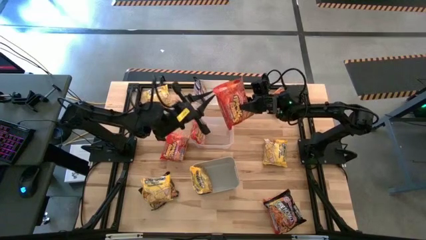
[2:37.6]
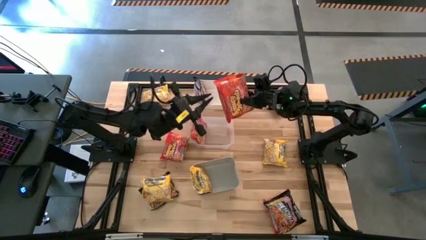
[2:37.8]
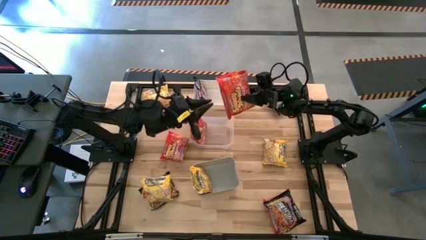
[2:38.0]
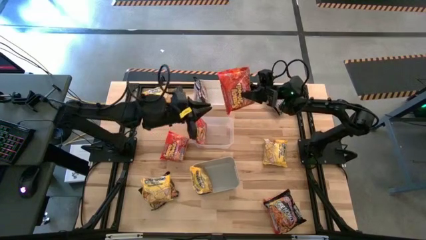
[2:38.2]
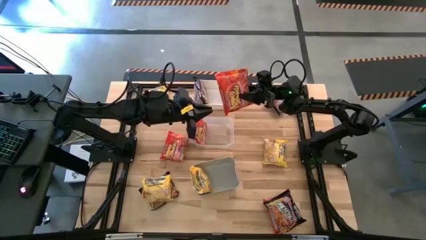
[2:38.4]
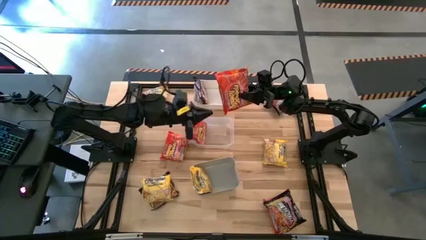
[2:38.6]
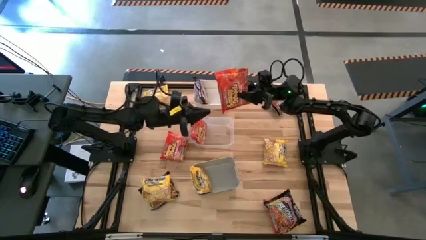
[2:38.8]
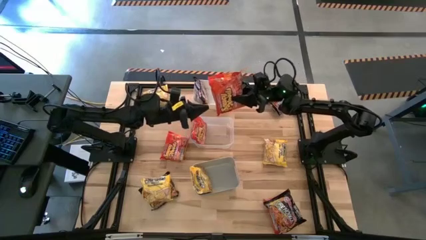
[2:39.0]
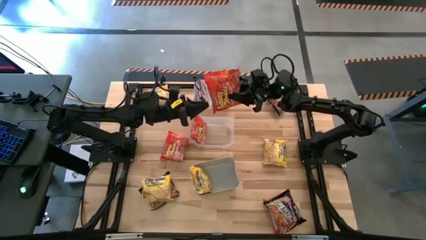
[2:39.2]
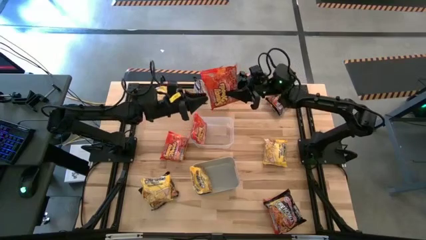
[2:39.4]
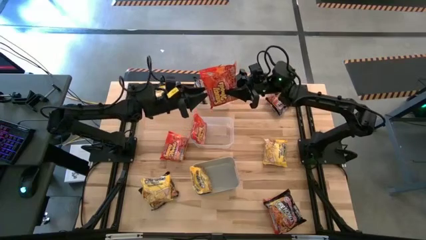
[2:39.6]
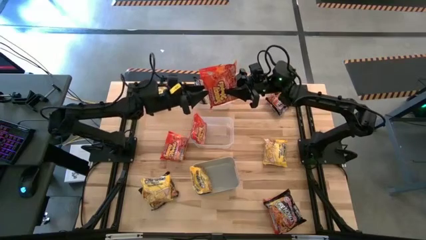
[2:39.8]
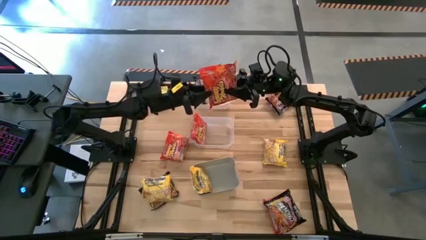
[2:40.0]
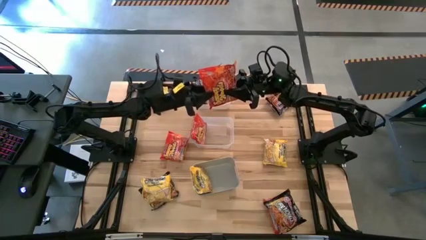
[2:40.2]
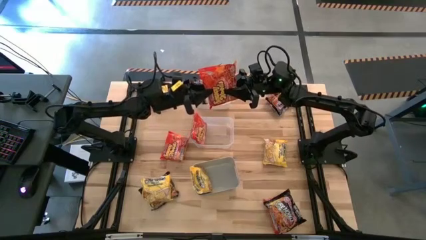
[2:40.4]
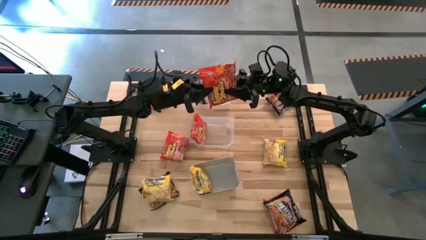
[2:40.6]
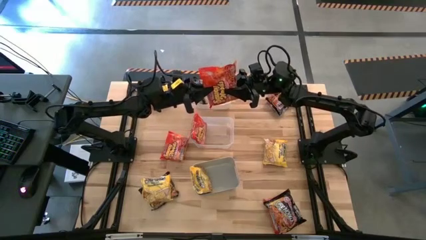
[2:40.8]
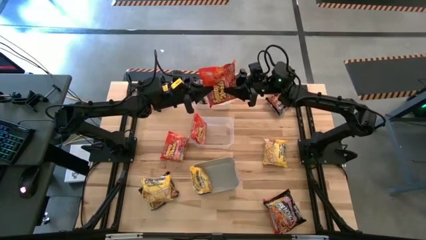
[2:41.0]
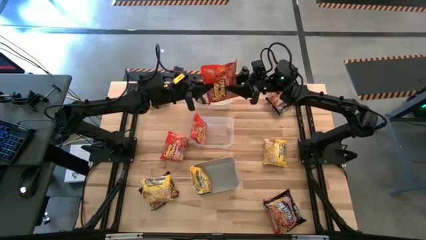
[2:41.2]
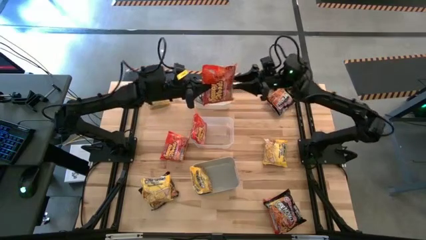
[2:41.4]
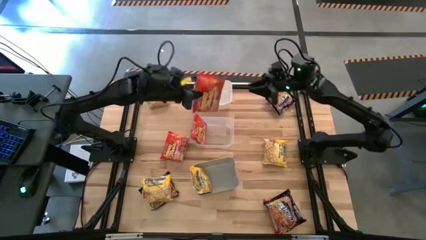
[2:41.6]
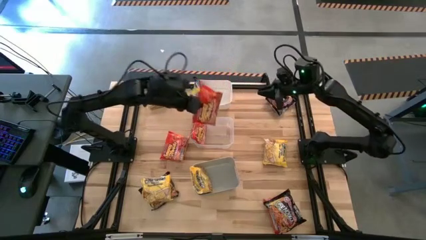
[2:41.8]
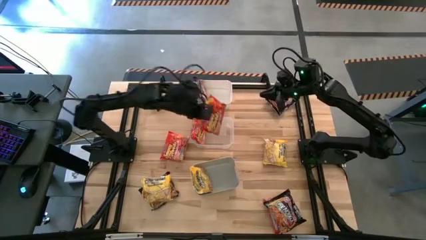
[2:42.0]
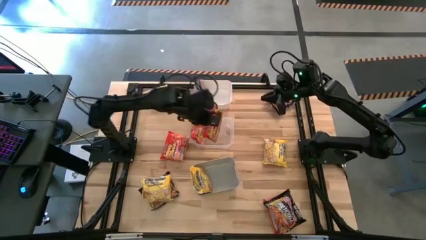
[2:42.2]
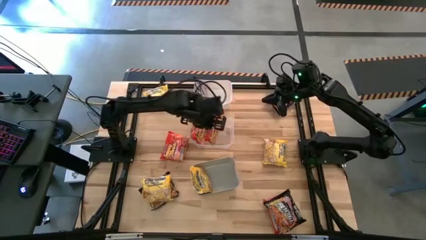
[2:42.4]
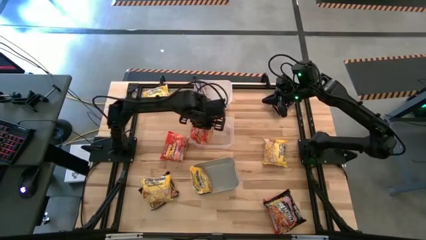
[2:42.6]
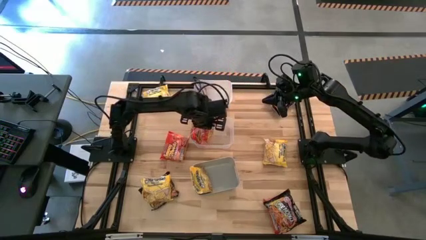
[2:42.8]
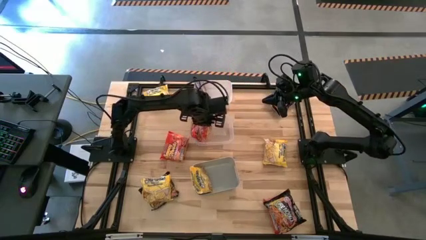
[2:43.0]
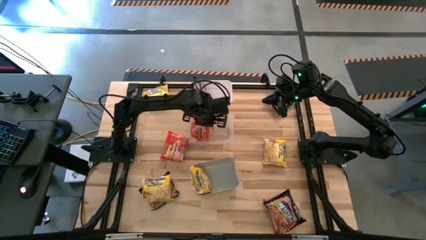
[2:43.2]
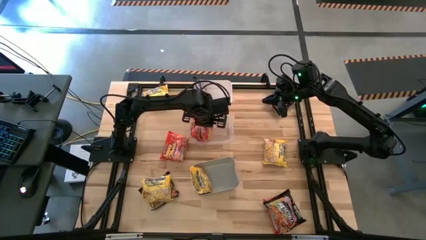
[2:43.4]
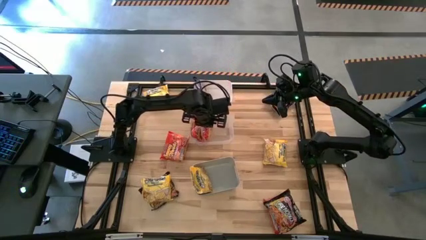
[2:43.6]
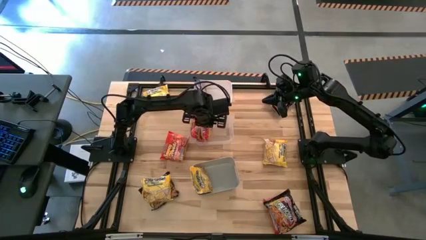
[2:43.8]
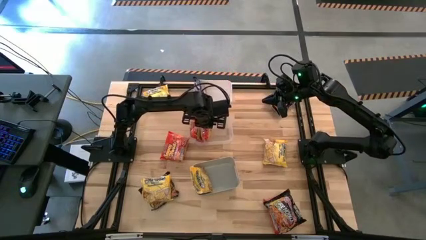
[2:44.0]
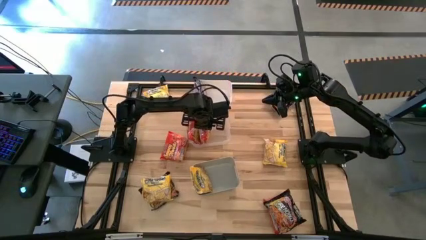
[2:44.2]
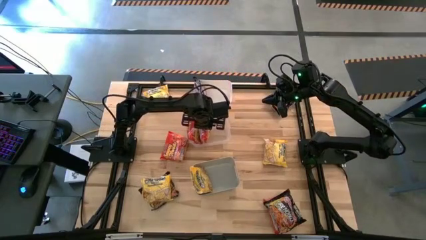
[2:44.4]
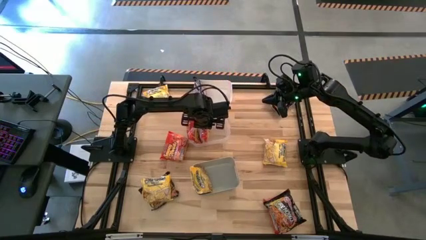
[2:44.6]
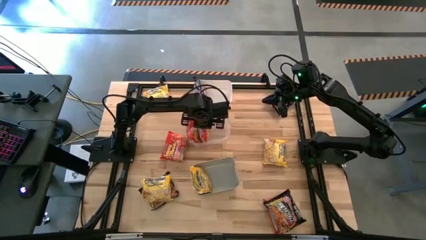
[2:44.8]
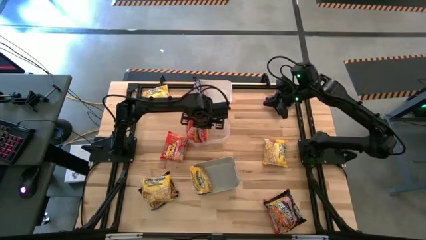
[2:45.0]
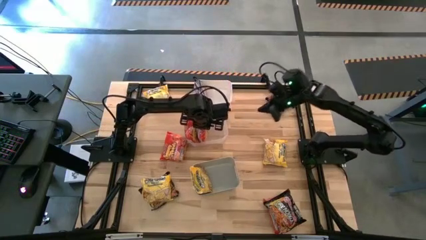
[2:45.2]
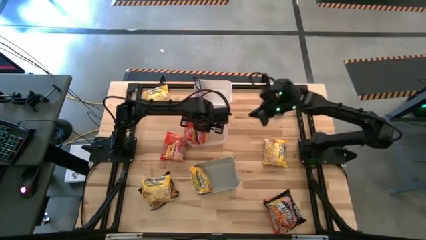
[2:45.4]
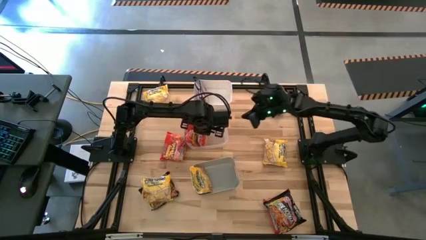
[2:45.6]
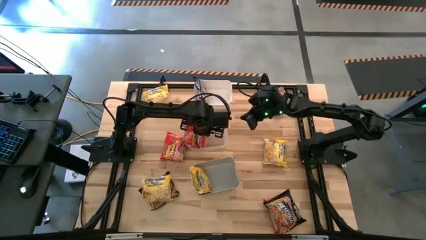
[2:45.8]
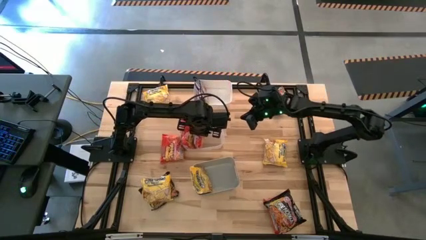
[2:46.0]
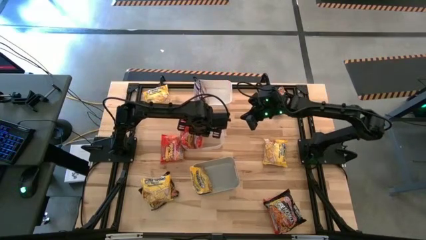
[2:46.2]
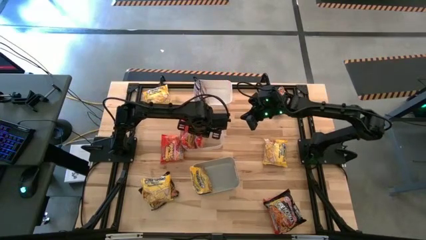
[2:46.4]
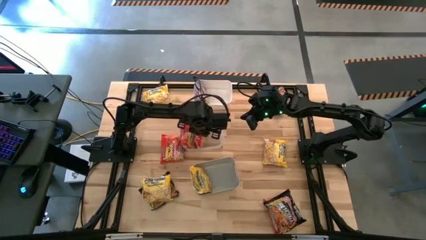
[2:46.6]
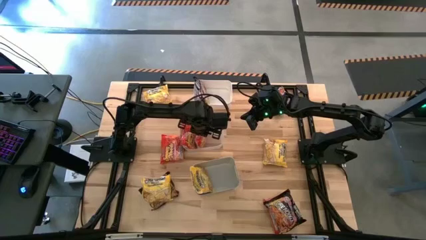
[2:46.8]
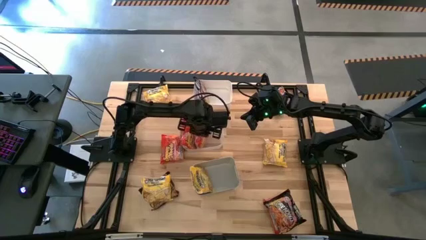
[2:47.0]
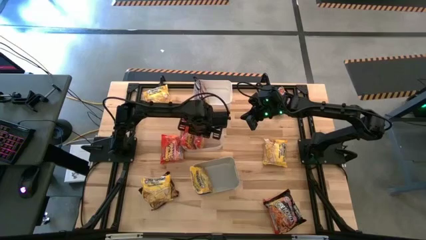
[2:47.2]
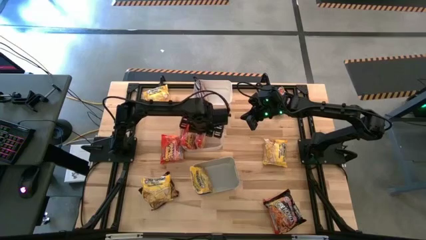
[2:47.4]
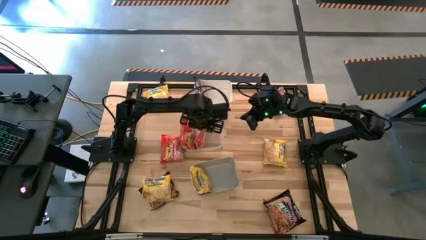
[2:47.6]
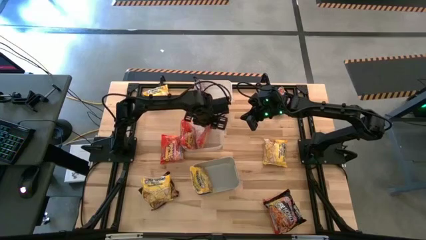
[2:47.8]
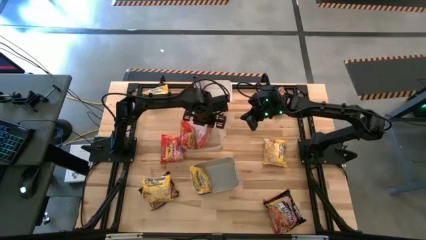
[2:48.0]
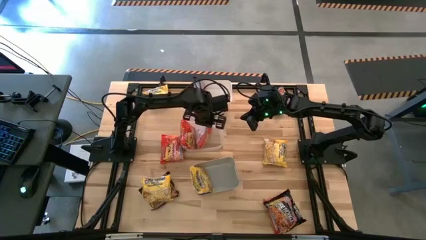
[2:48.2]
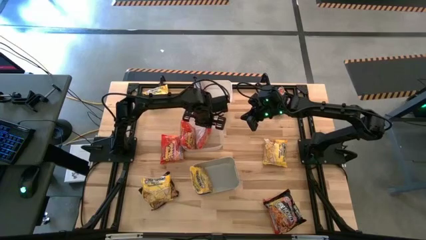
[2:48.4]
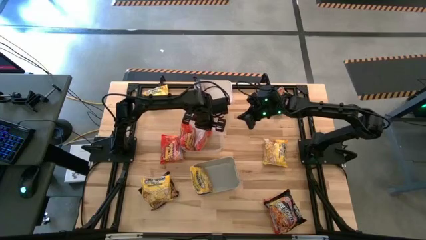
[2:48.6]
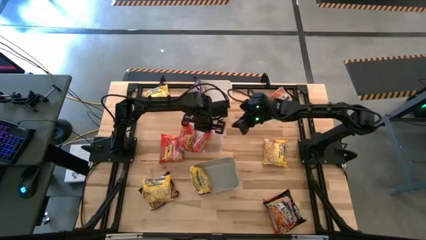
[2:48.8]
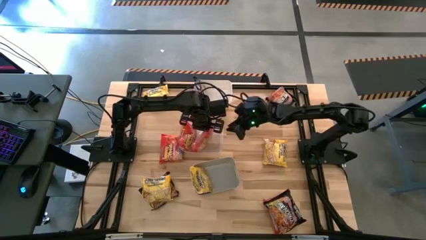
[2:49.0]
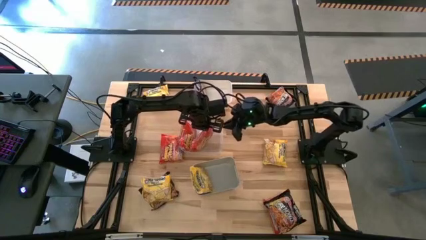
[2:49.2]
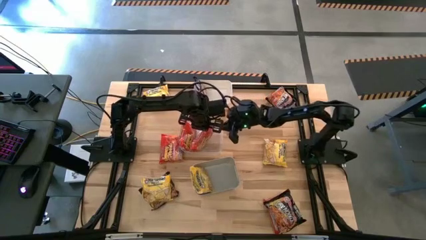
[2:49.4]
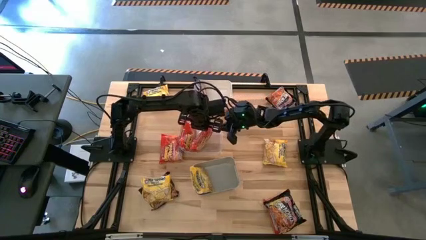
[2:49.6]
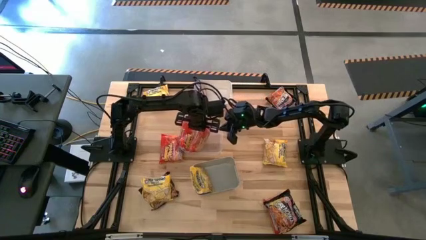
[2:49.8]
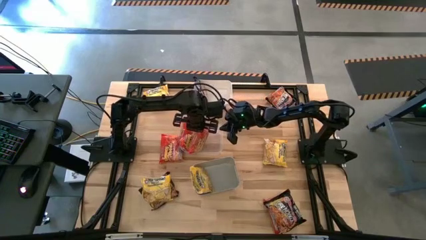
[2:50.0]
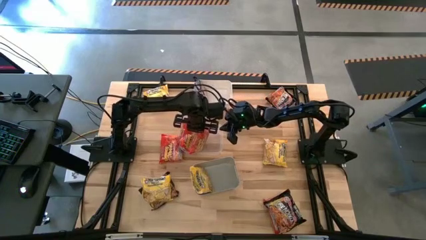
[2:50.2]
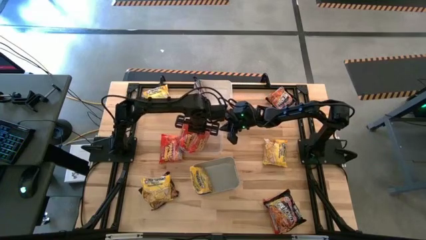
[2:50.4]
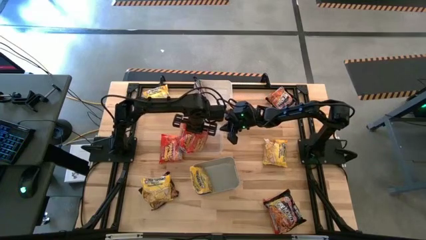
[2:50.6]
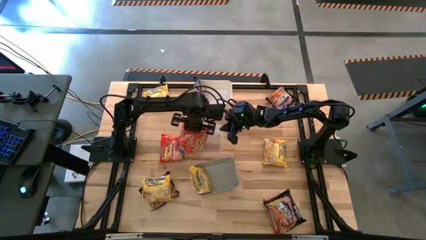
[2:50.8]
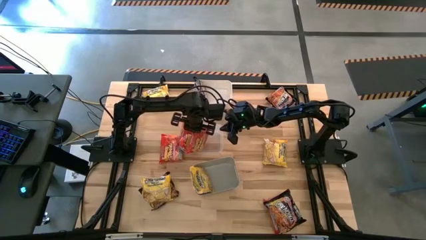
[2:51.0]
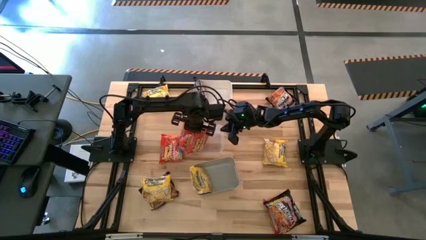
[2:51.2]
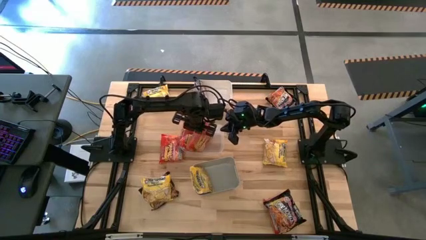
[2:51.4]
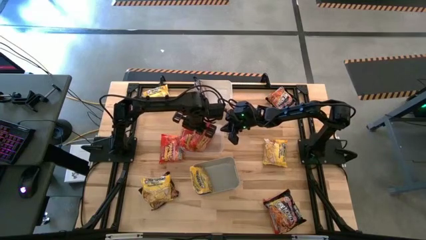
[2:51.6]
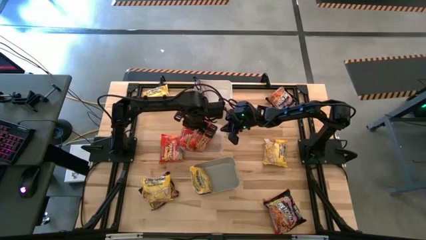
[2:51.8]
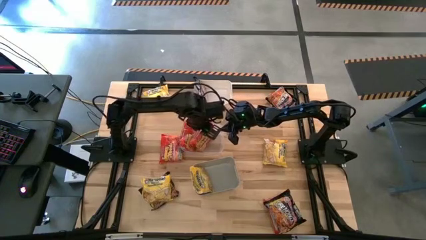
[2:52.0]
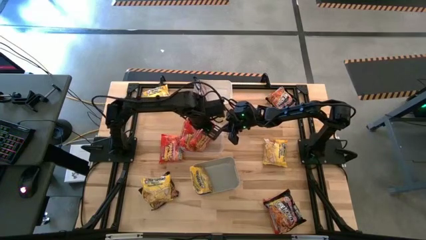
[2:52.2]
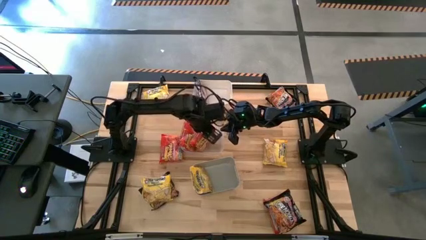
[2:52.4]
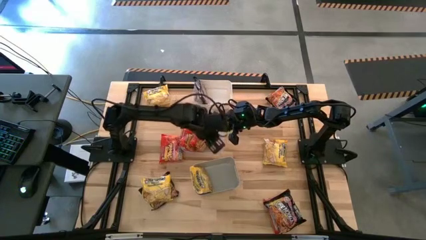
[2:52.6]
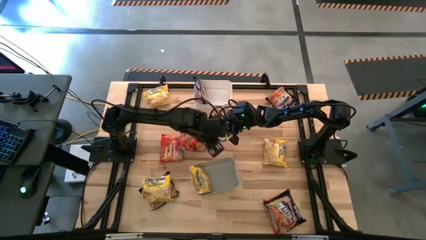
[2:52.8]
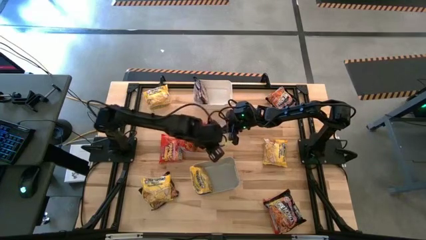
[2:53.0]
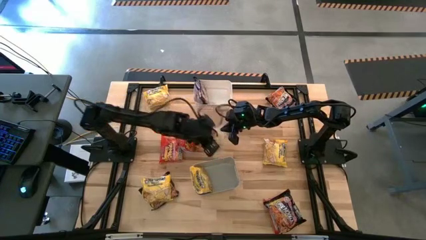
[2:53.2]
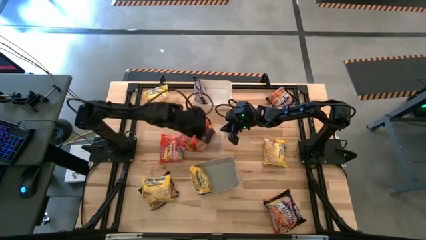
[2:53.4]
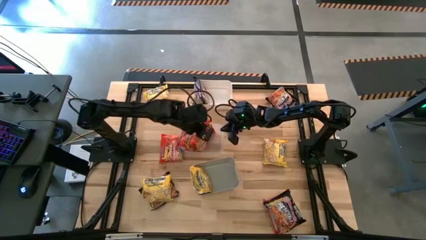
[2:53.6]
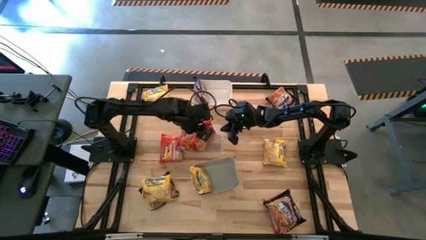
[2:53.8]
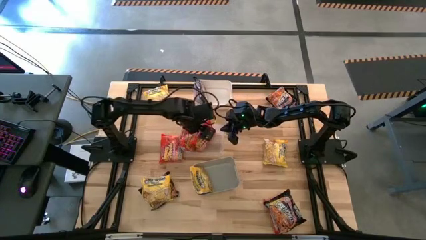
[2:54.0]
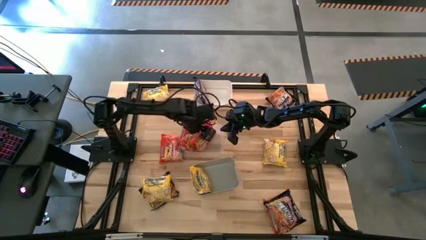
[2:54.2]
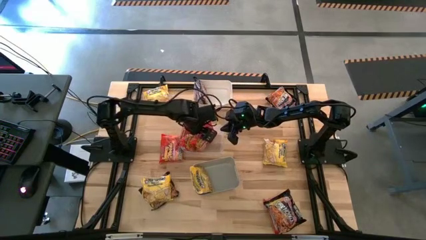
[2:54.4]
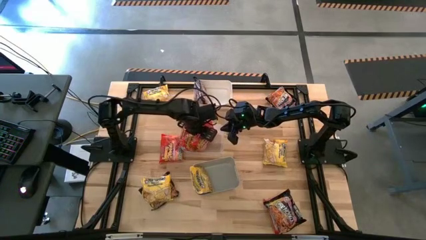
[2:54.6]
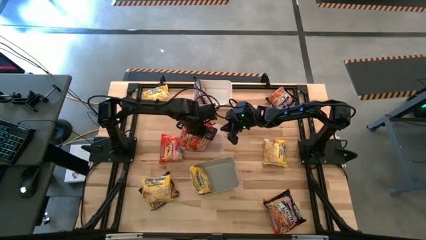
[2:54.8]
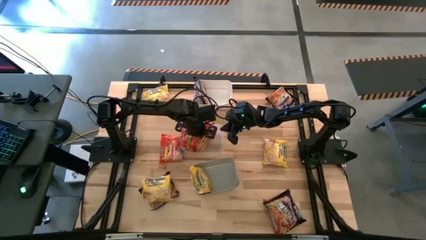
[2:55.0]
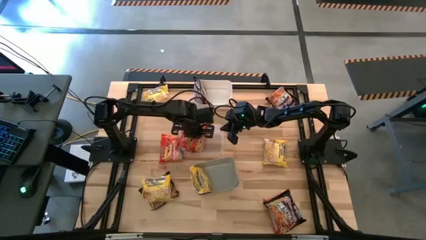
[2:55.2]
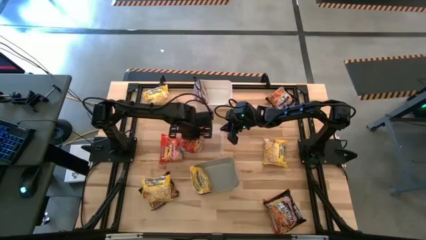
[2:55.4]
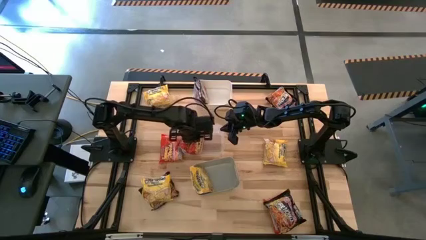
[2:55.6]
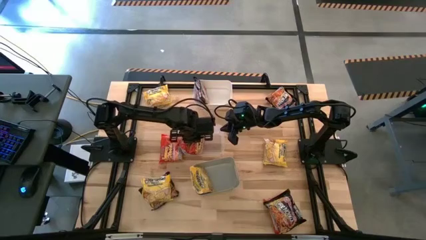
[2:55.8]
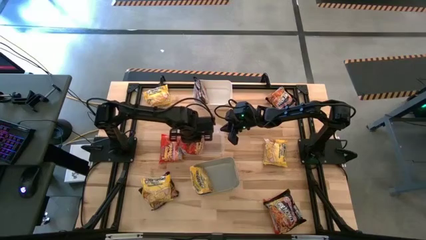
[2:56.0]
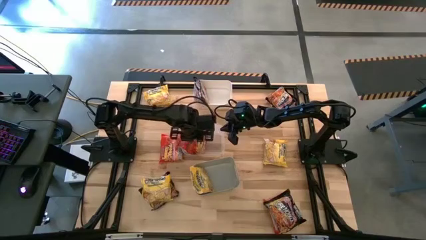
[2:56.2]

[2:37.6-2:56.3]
Task: Sort Maruchan noodles
Put the orange noodle pack into the transparent bin
